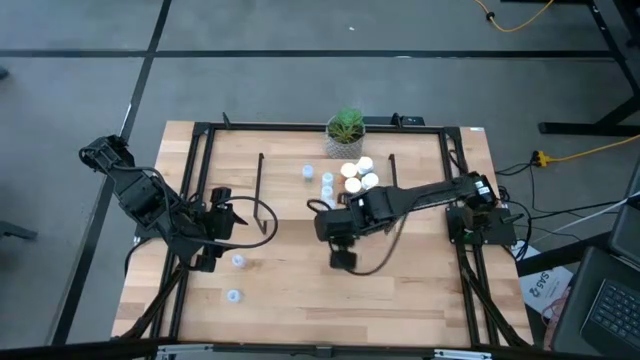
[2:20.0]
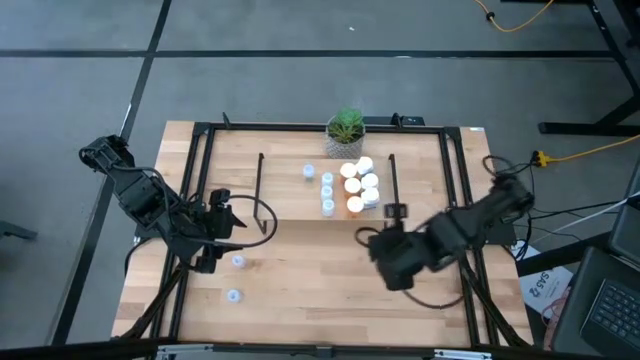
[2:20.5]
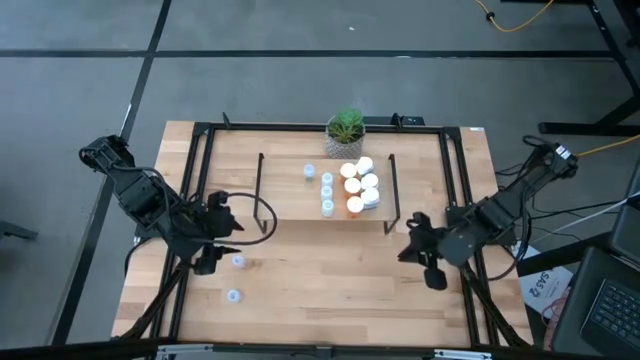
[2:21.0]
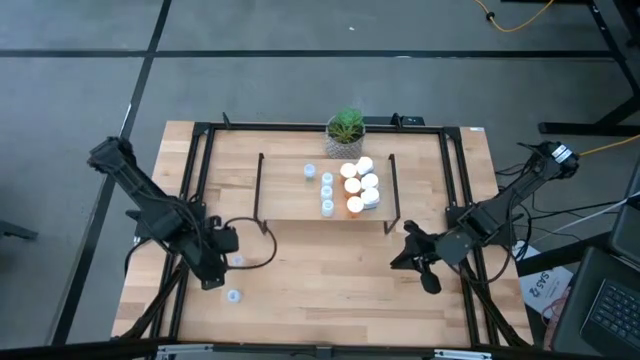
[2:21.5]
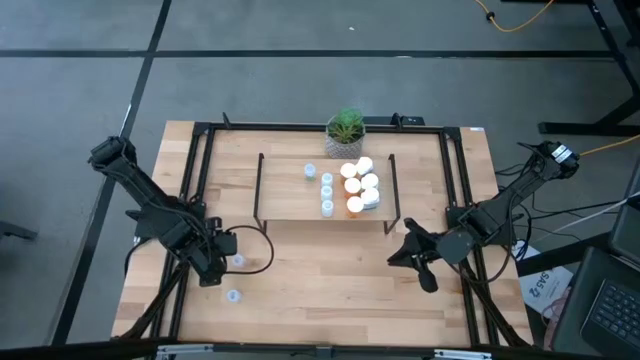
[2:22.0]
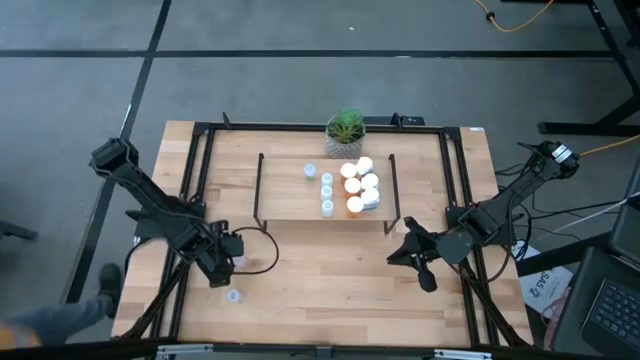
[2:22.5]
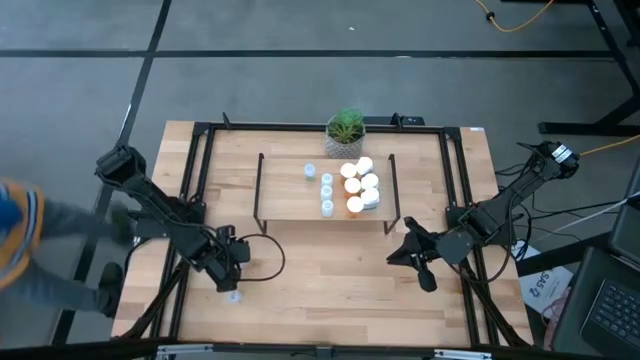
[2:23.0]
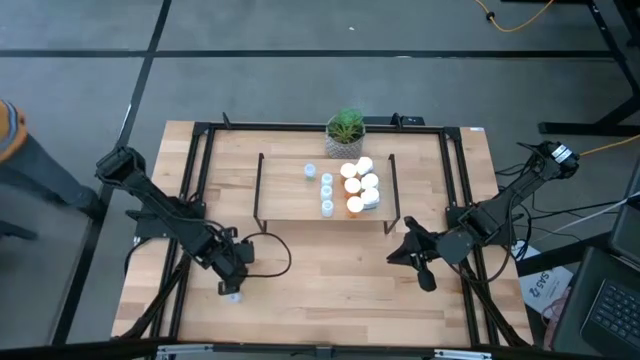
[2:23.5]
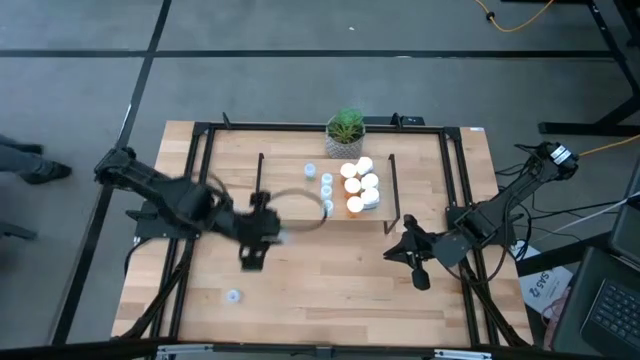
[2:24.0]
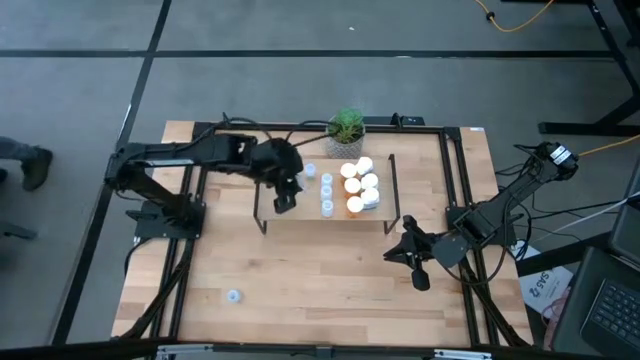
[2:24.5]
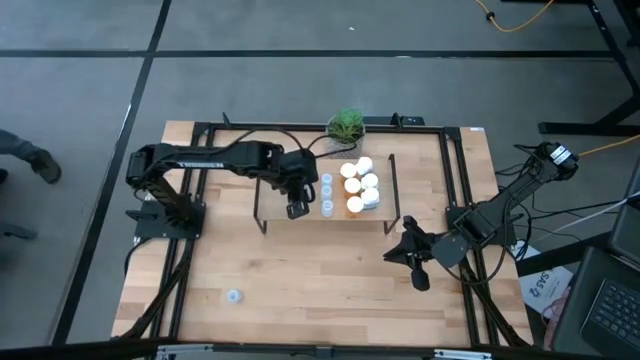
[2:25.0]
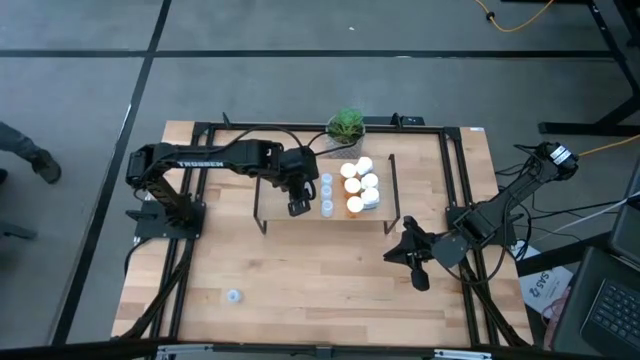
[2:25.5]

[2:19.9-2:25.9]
Task: Pick and place medicine bottles onto shelf by color
Put the top transparent pill bottle on the shelf aligned with the other transparent pill bottle

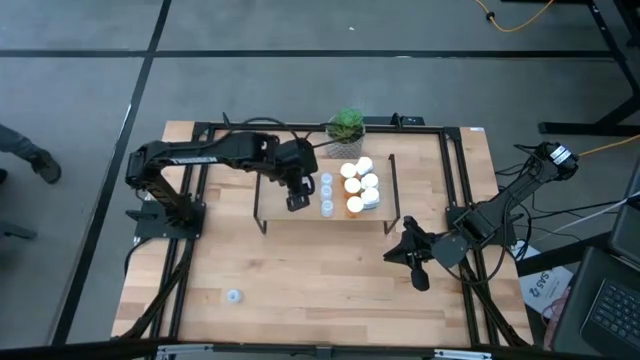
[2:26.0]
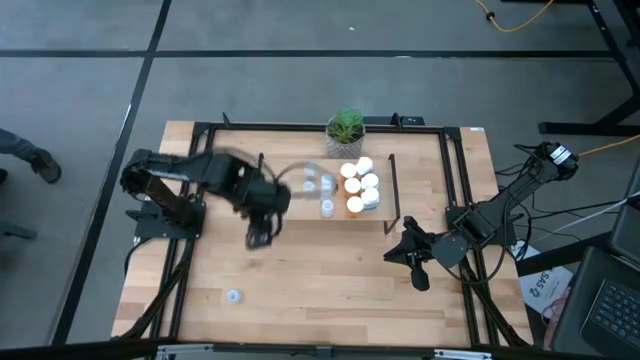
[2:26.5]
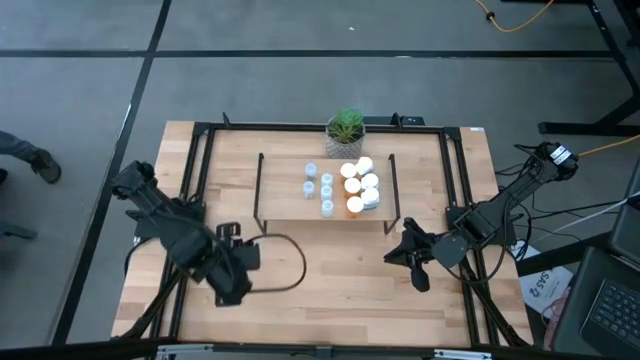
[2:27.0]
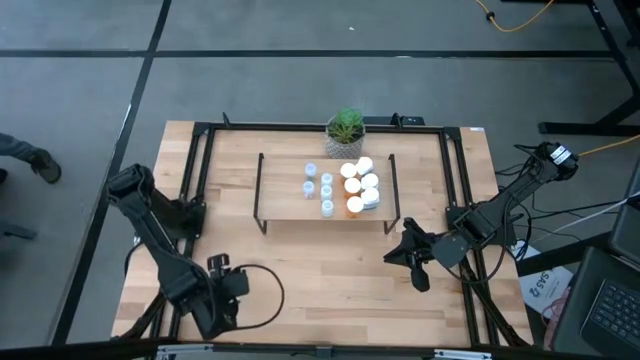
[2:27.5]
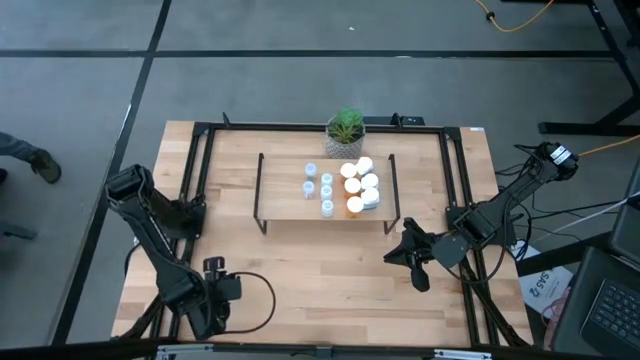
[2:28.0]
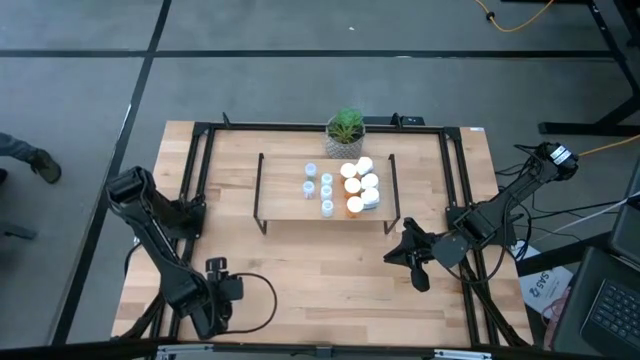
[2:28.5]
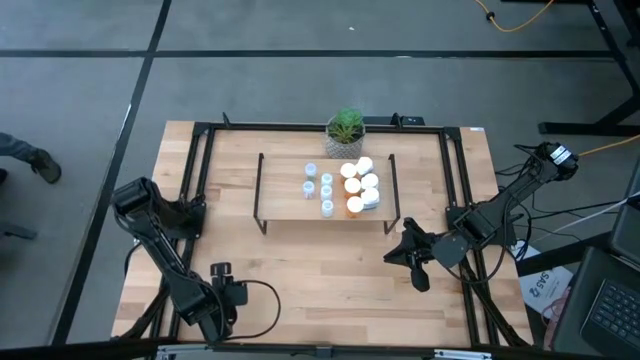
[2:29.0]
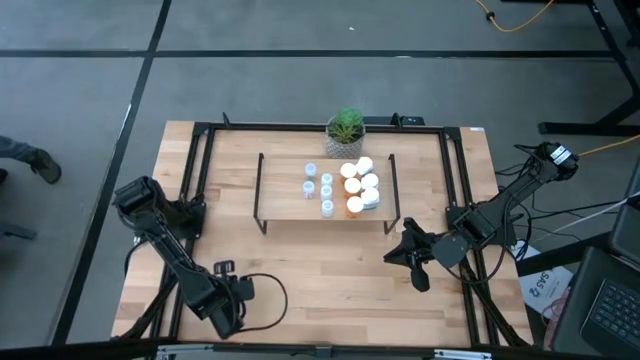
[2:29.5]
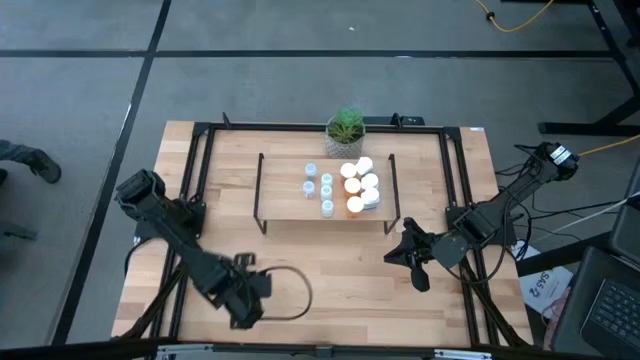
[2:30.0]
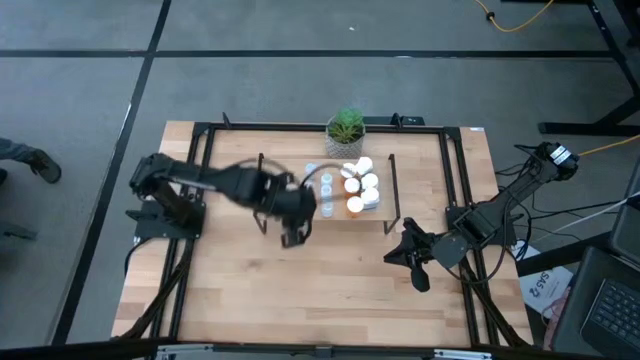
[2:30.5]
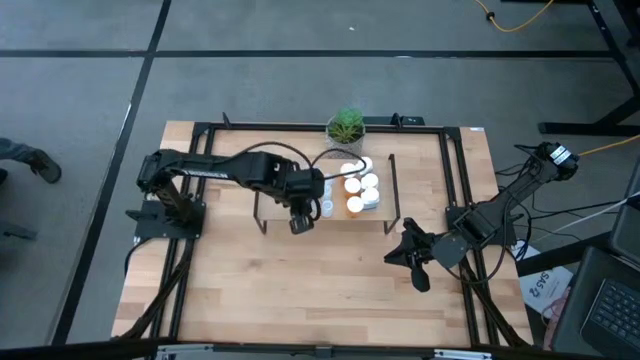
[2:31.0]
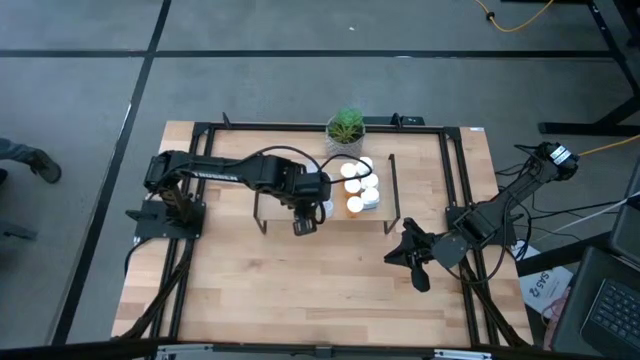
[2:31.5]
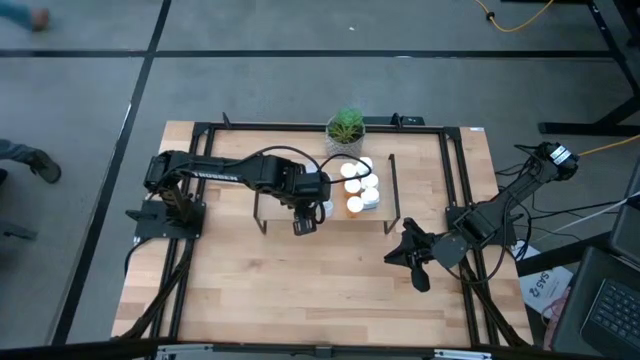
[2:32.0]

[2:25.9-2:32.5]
Put the transparent pill bottle on the shelf aligned with the other transparent pill bottle

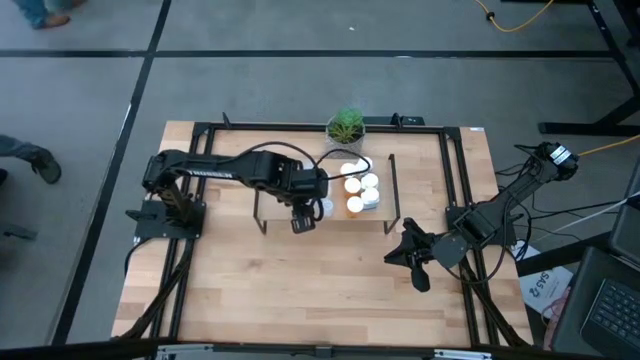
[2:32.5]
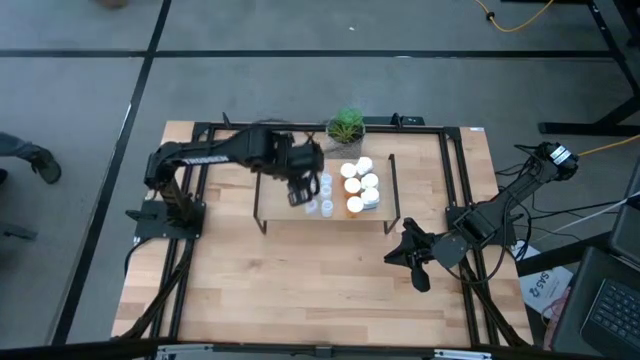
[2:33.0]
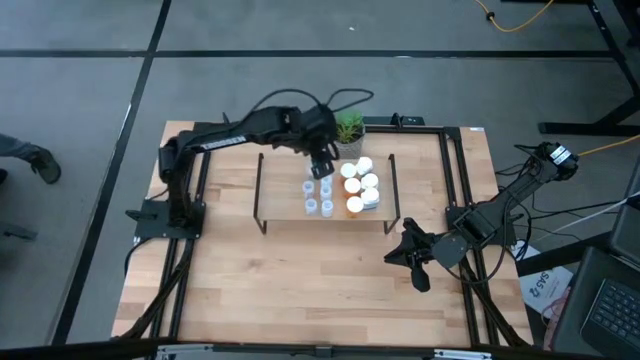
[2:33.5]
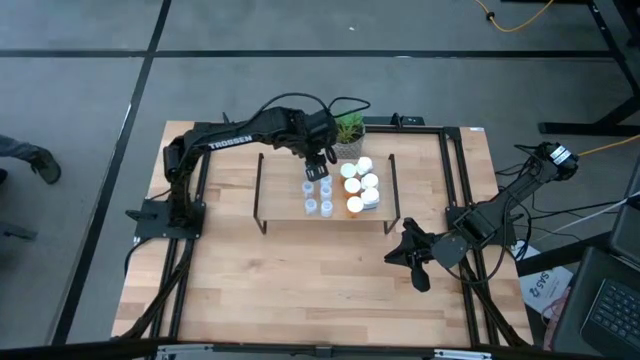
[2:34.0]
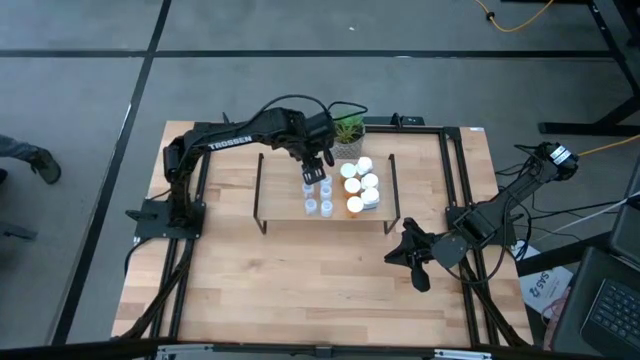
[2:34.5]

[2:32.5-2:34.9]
Adjust the transparent pill bottles on the shelf

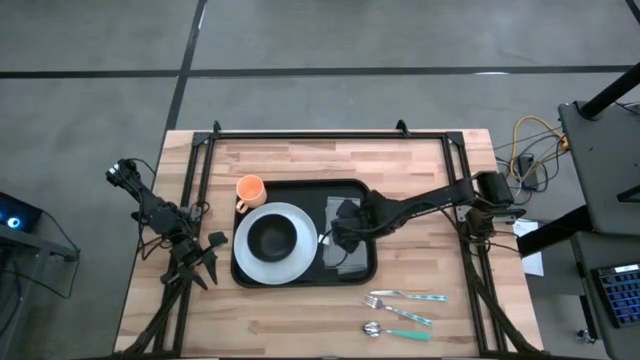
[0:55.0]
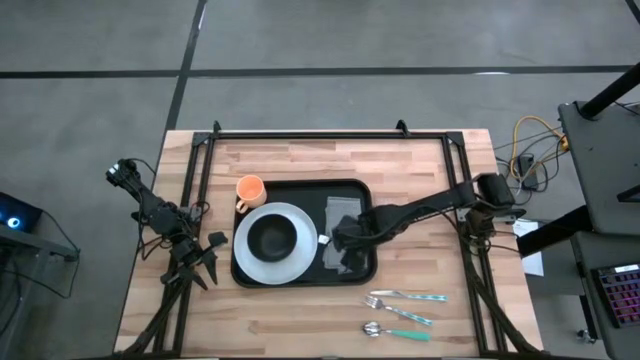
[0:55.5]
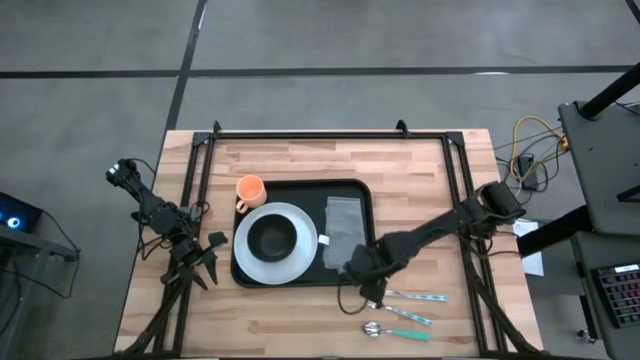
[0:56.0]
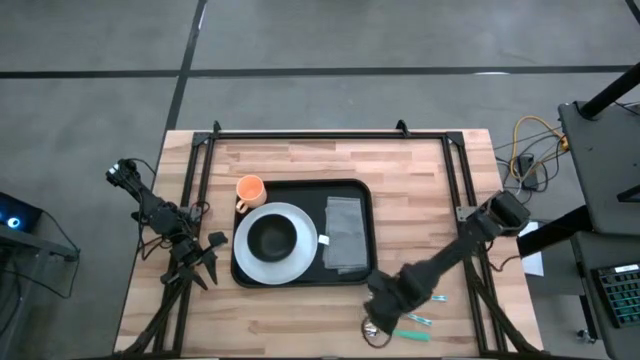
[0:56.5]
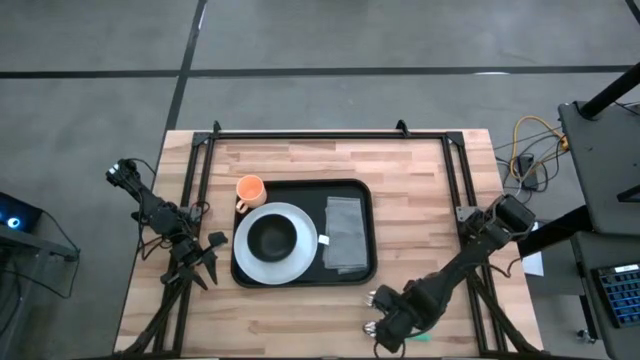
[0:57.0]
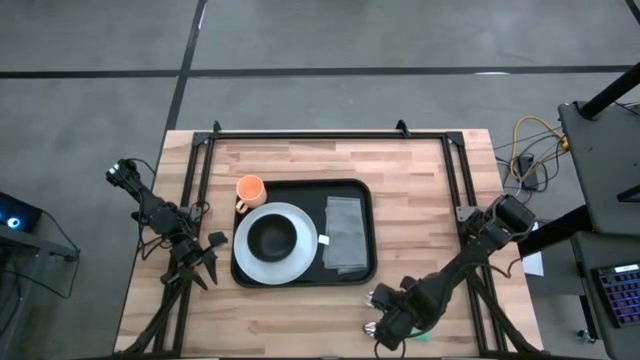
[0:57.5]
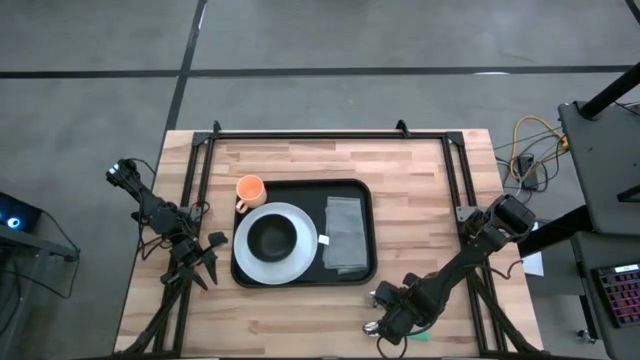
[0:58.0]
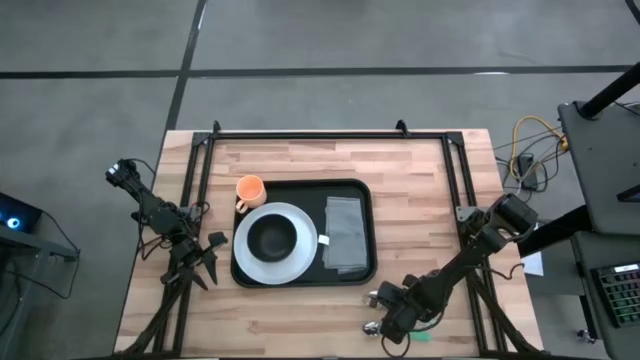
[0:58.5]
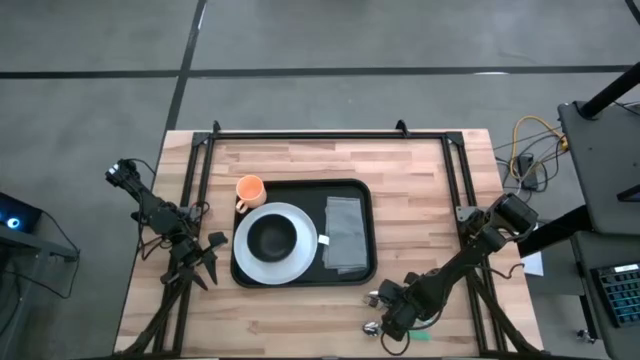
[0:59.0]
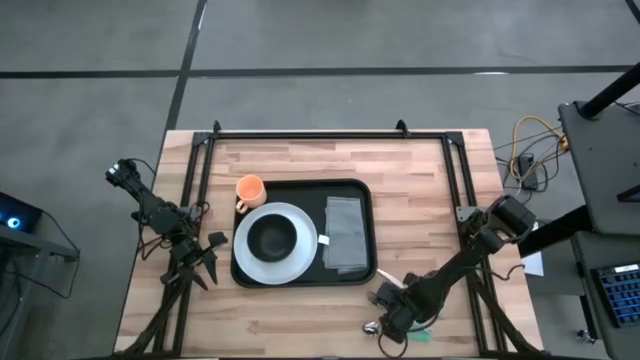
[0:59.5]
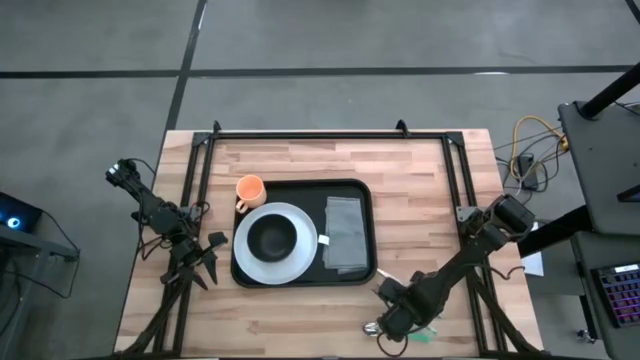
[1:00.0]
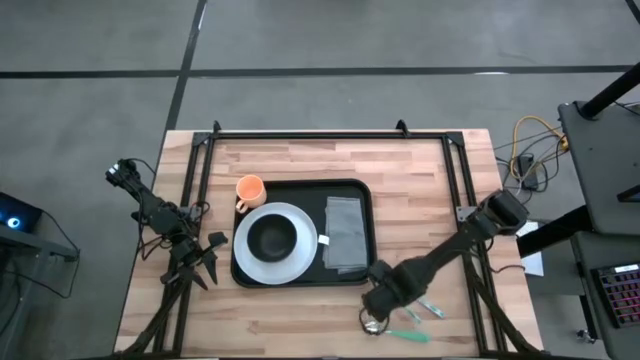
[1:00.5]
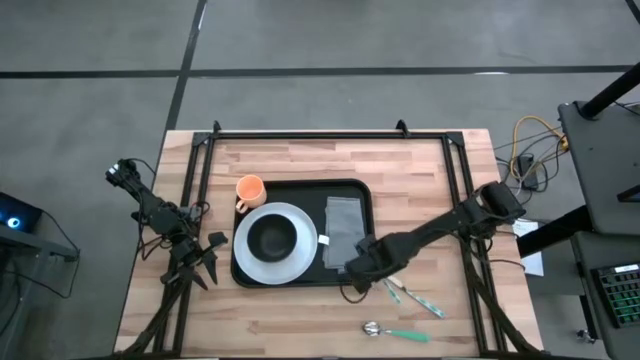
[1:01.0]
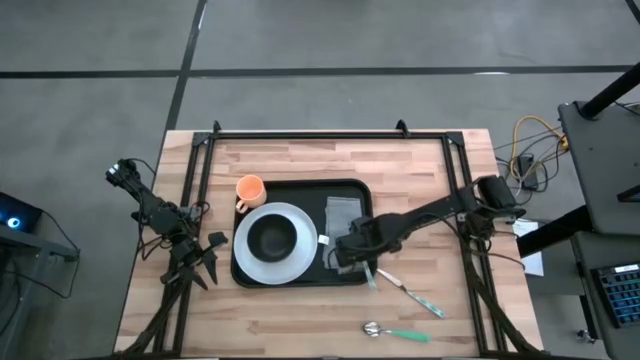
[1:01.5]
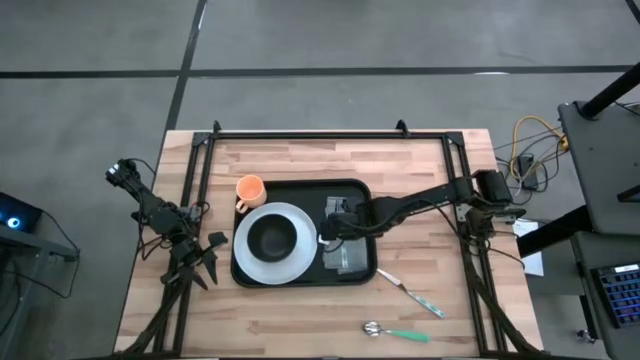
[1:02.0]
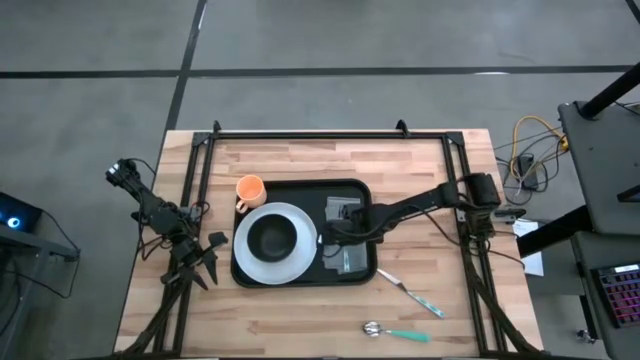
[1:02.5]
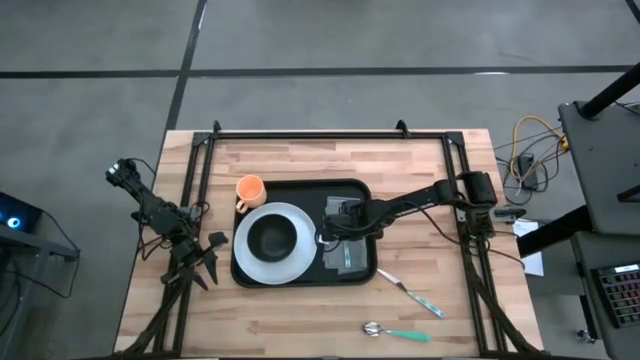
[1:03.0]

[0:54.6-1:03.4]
Task: Set up tray
Put the white and blue fork on the gray napkin
